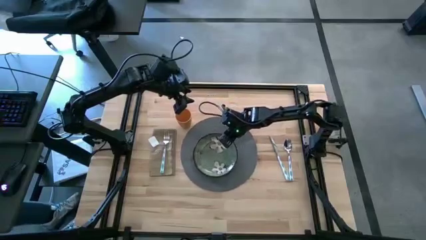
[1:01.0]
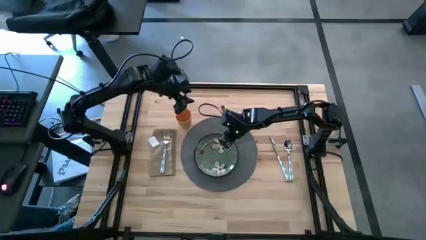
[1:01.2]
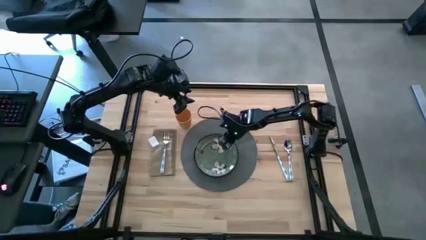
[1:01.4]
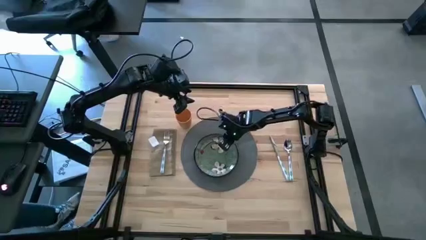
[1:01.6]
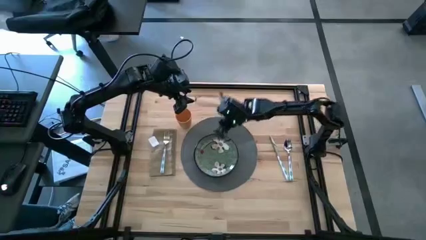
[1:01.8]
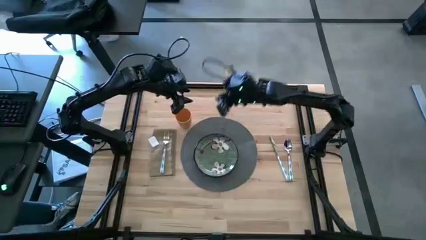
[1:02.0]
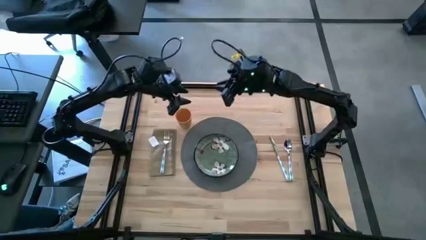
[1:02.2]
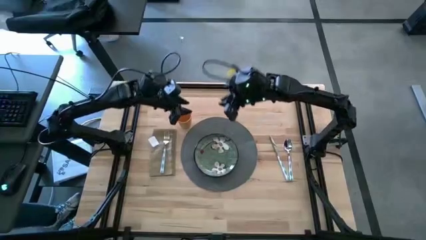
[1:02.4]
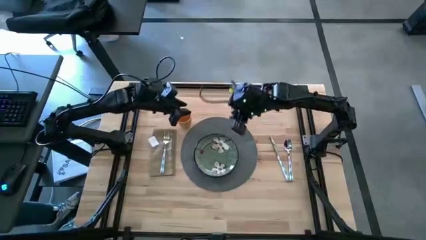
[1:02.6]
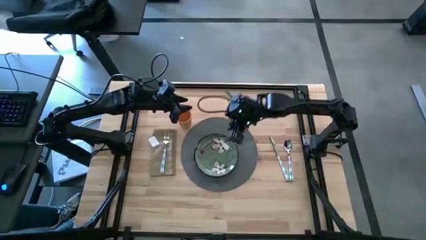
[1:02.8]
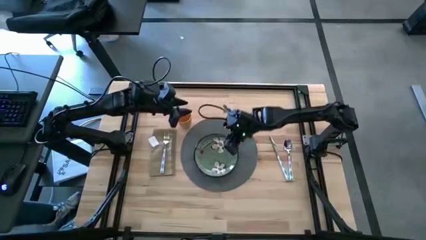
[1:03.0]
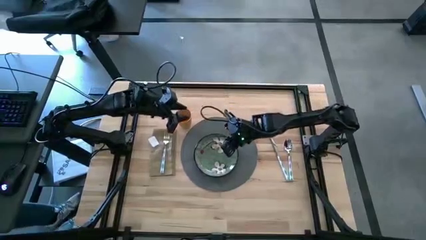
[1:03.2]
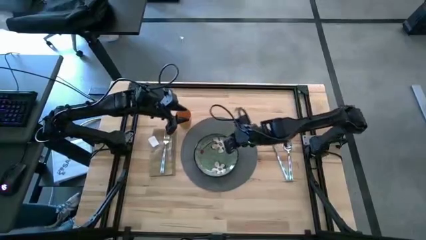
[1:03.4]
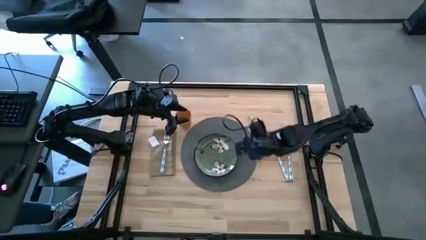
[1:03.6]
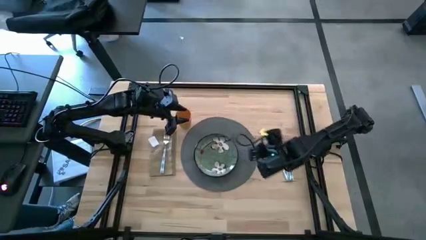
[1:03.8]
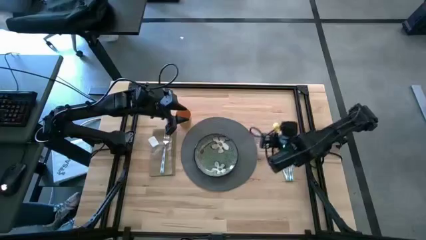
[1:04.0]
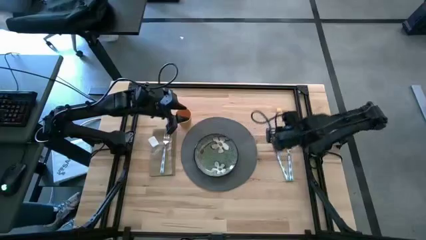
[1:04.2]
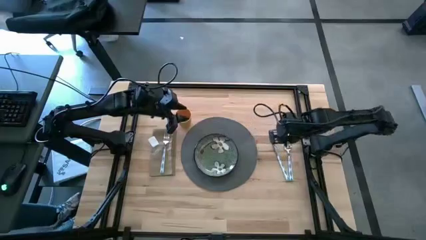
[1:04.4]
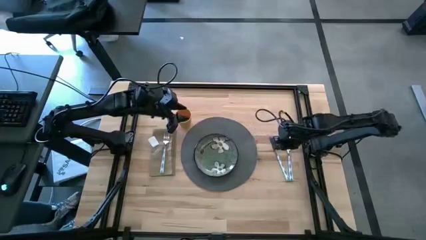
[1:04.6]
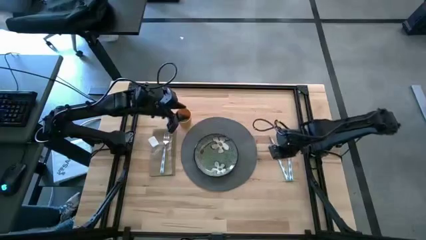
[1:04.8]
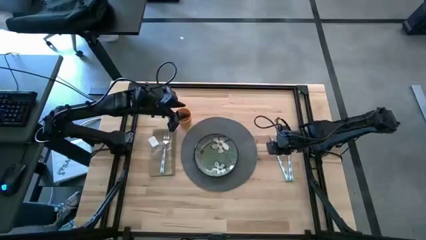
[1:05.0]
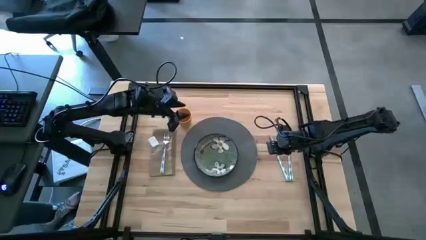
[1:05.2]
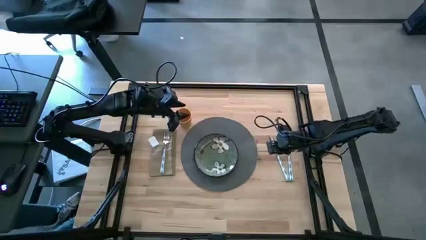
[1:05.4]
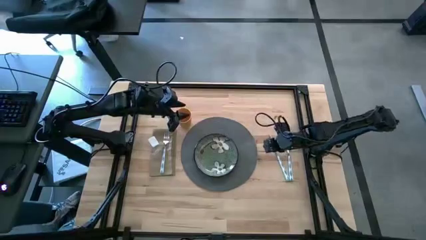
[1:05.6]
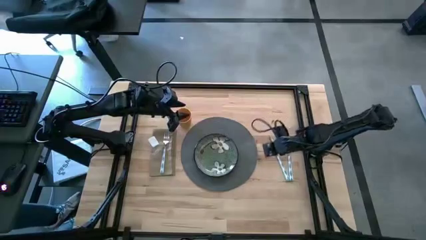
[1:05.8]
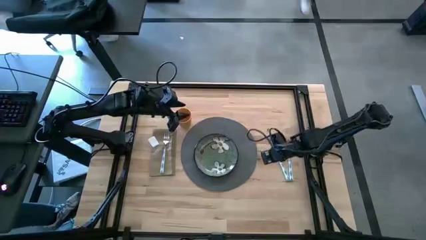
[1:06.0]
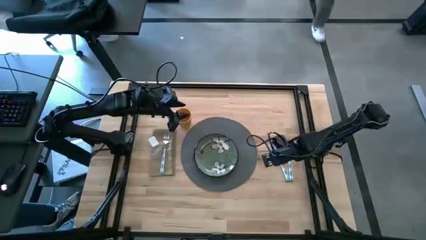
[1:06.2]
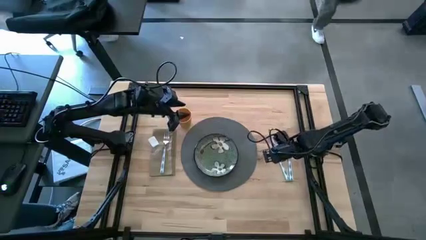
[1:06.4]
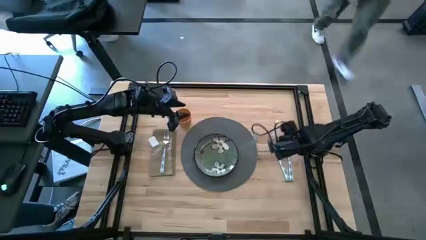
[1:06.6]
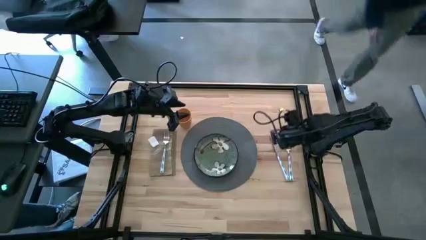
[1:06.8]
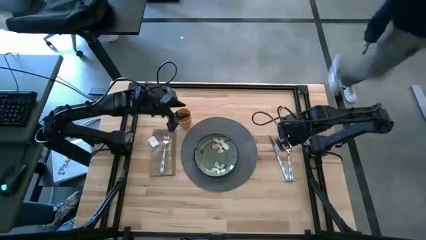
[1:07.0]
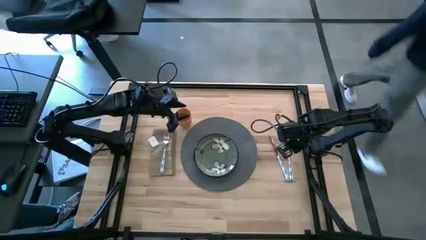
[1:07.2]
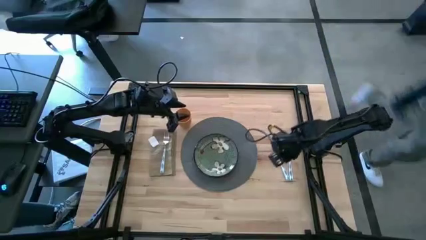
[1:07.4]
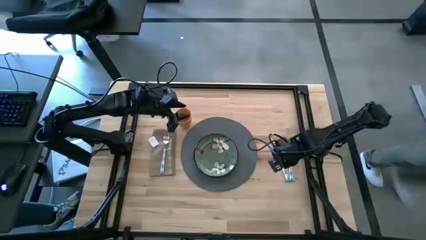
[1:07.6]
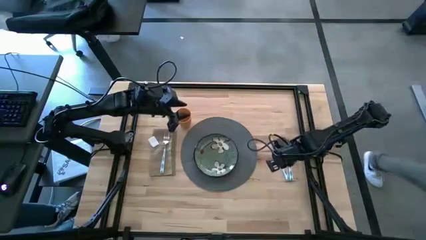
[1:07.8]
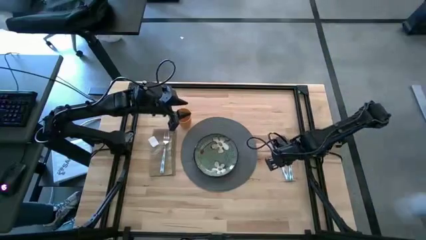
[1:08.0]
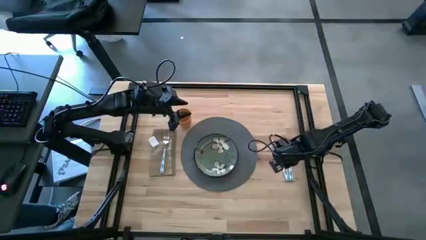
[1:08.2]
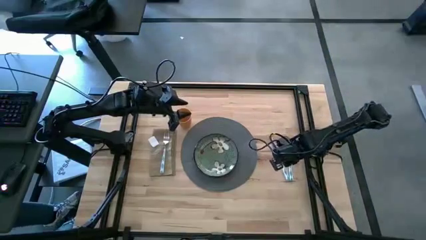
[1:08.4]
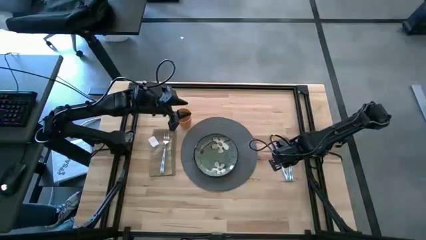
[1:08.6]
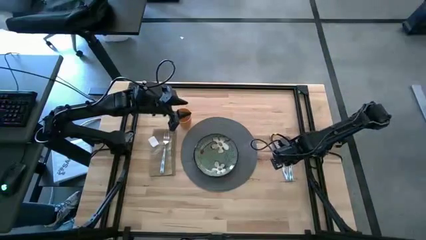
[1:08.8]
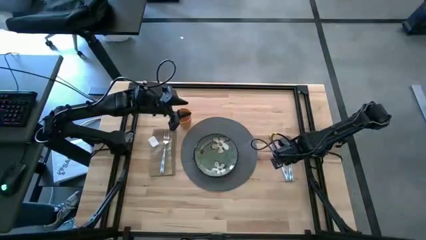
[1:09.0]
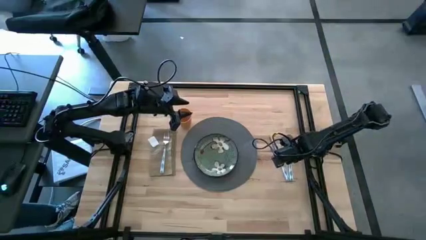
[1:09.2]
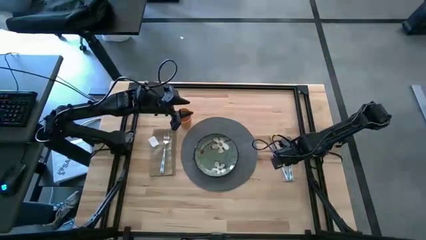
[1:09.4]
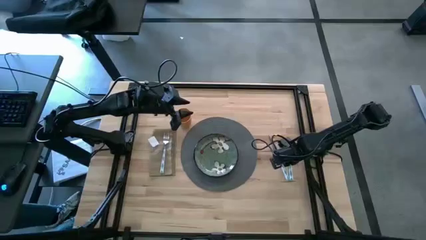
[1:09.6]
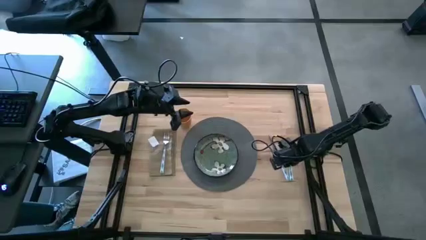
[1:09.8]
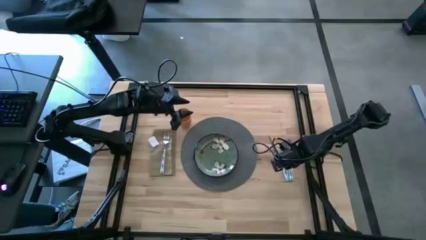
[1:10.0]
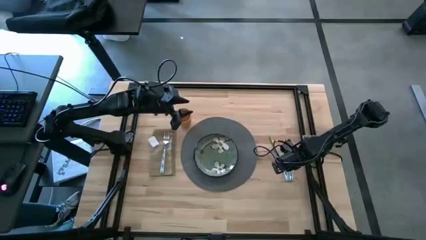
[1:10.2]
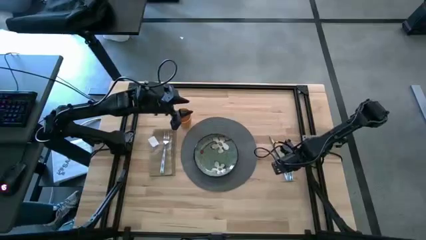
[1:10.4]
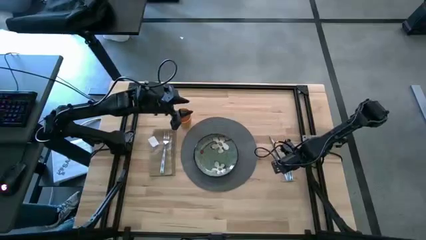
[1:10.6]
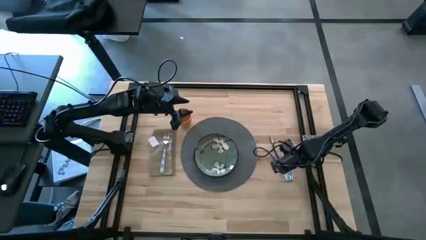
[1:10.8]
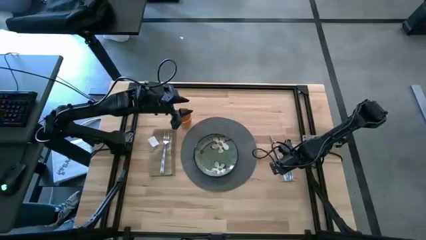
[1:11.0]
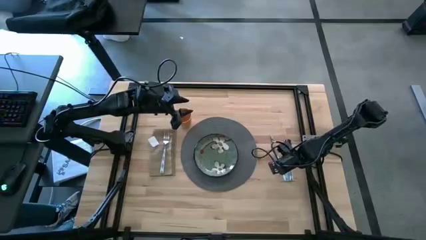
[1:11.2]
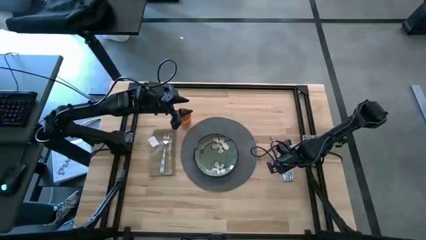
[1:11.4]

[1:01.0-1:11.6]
Task: Set table place
Move the white patterned table knife to the right of the gray table mat

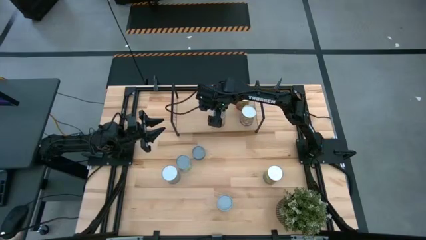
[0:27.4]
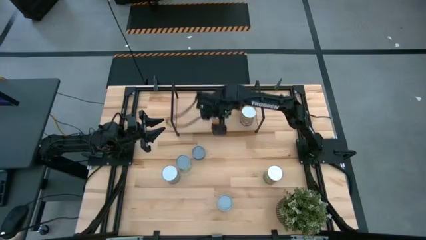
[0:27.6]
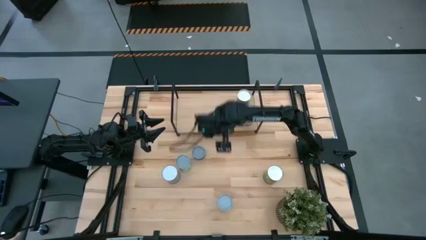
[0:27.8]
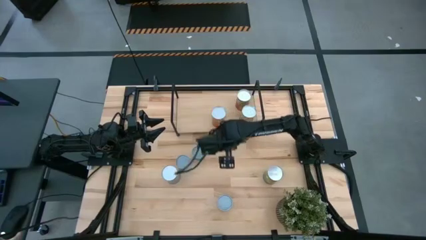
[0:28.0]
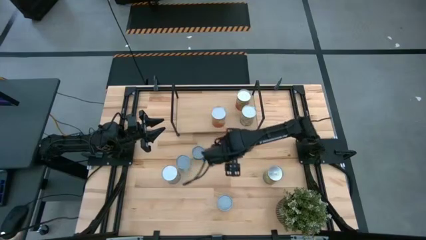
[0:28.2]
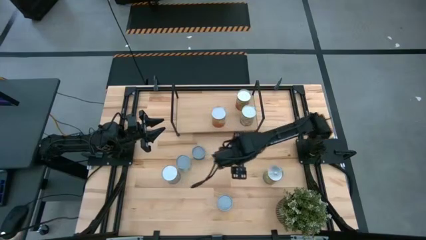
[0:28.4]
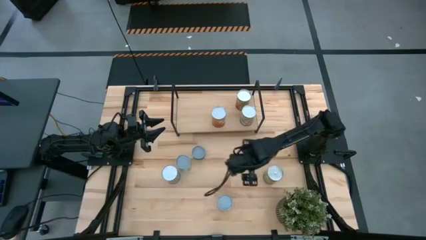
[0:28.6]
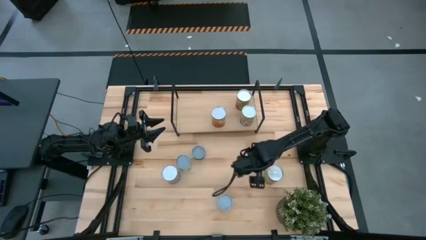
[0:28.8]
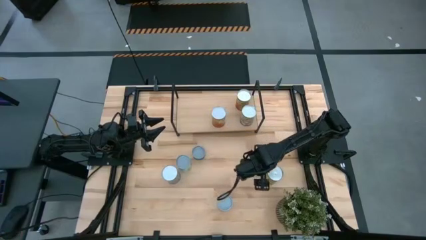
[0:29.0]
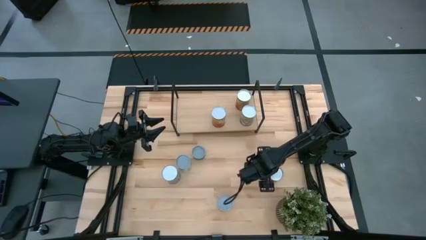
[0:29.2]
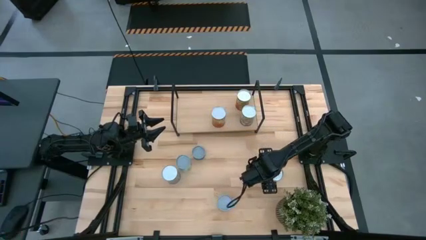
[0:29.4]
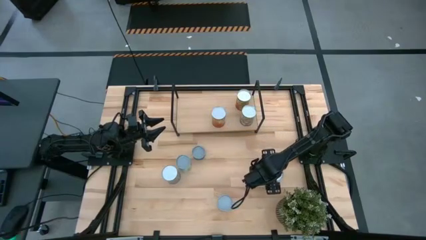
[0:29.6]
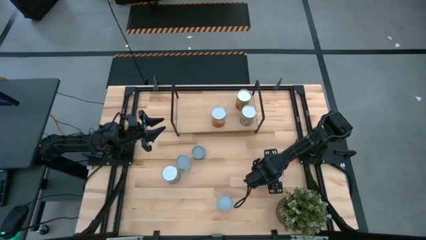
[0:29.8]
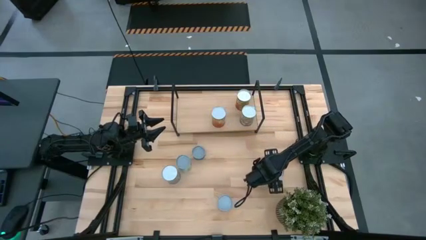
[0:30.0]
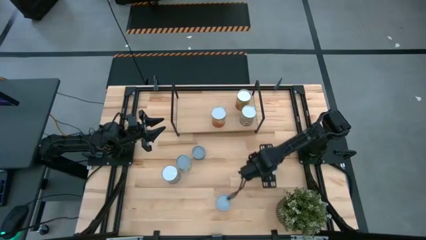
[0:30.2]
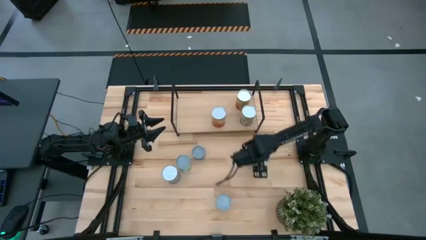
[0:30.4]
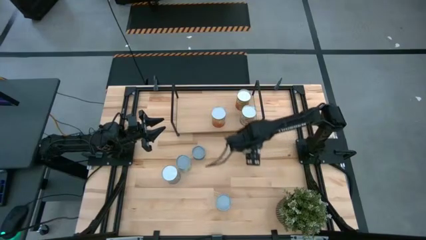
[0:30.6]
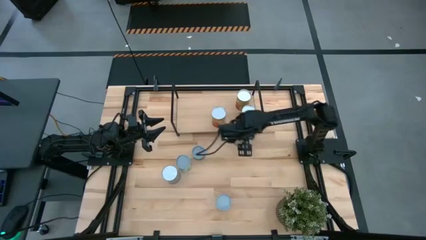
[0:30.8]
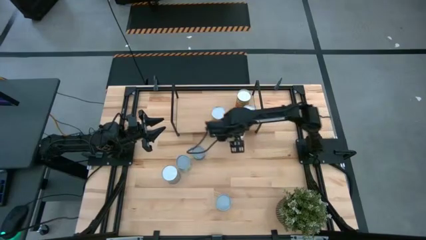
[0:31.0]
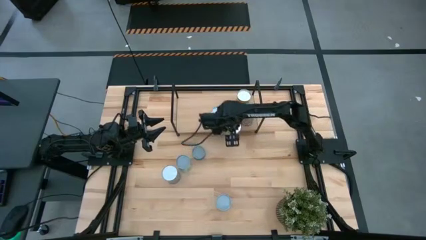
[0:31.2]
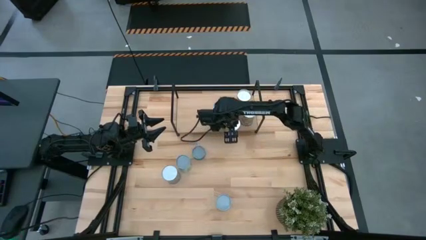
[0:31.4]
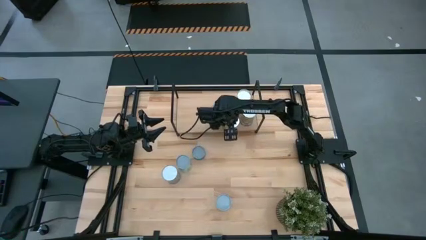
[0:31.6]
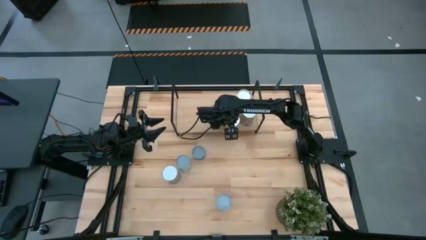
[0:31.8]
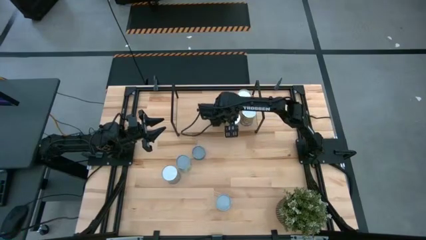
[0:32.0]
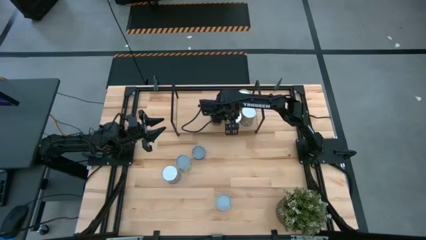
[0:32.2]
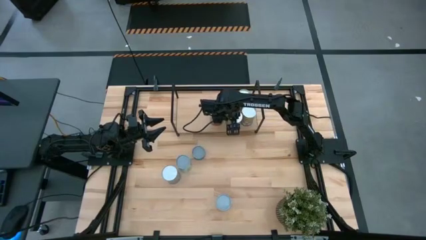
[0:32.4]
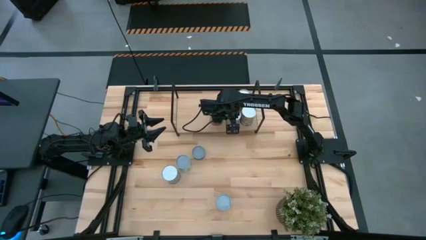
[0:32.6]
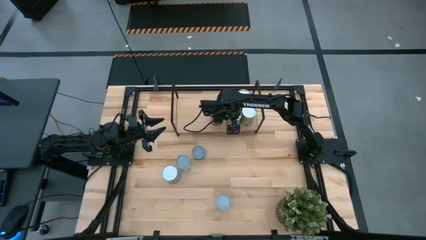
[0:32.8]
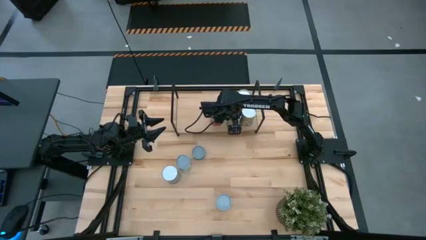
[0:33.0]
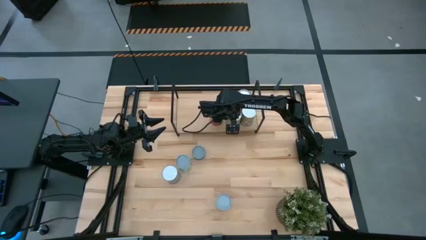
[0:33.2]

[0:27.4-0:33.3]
Task: Pick and place cans onto a shelf
Put the canned orange on the shelf
